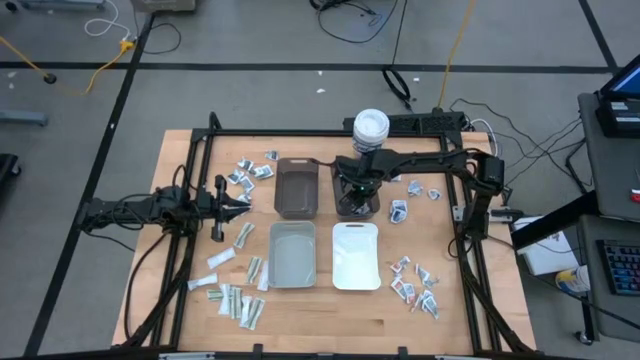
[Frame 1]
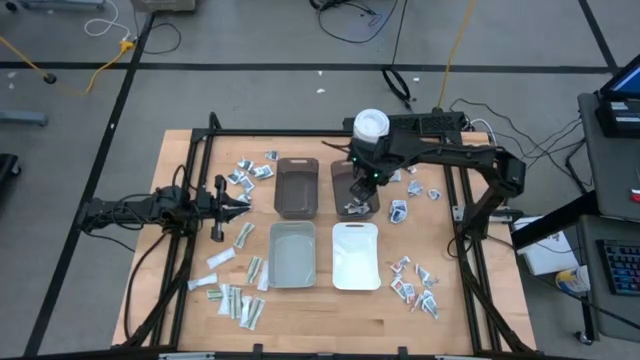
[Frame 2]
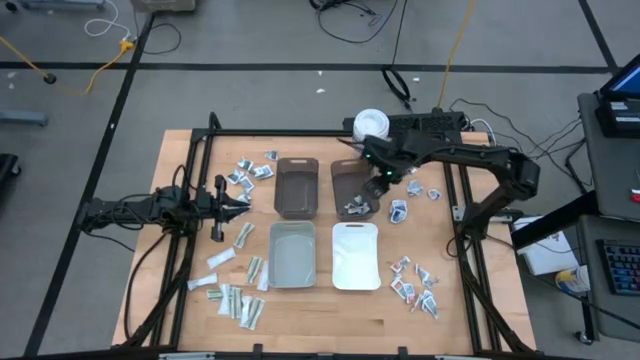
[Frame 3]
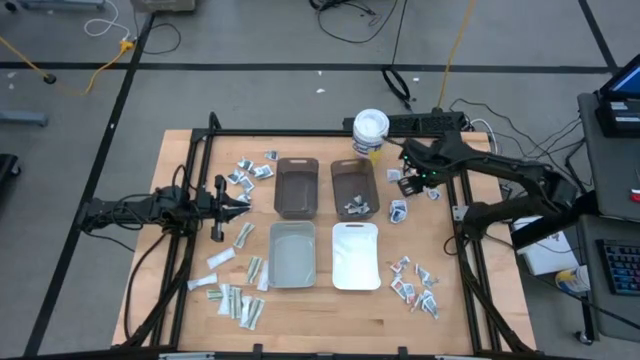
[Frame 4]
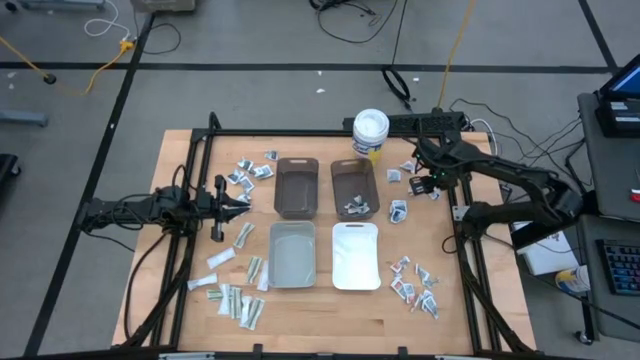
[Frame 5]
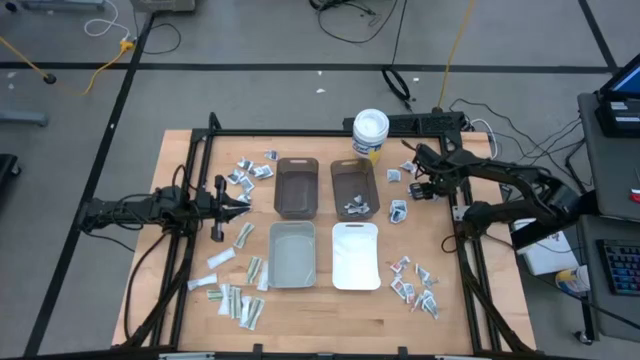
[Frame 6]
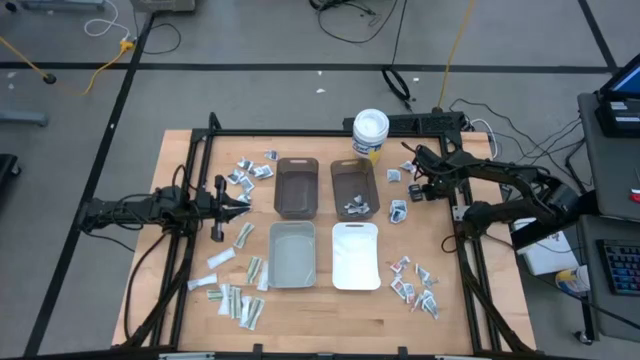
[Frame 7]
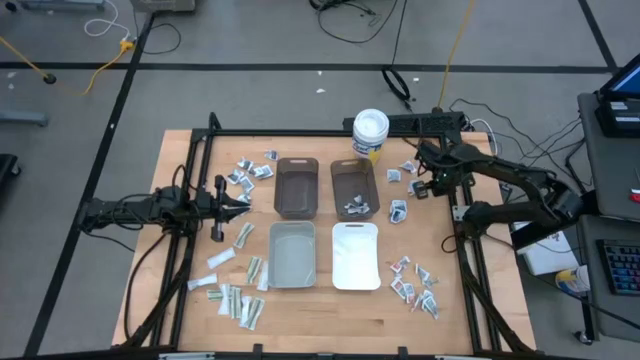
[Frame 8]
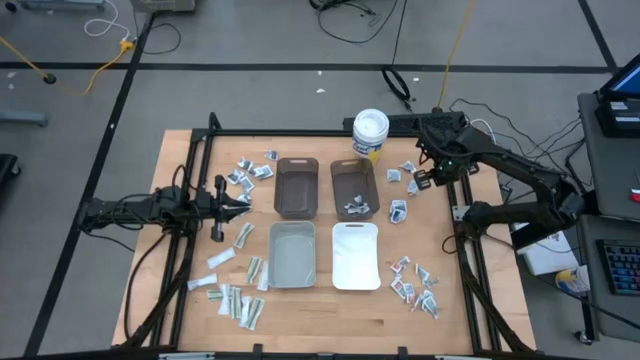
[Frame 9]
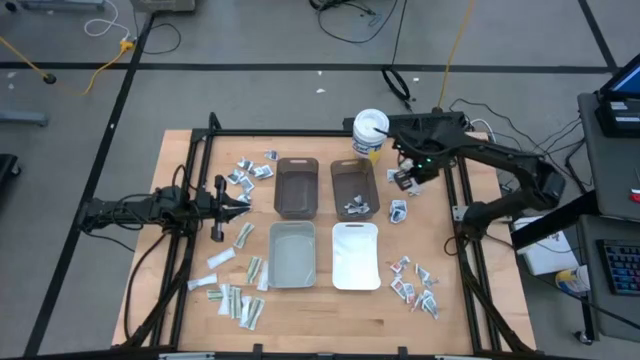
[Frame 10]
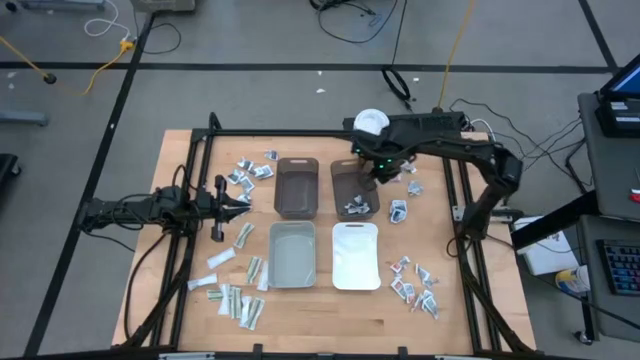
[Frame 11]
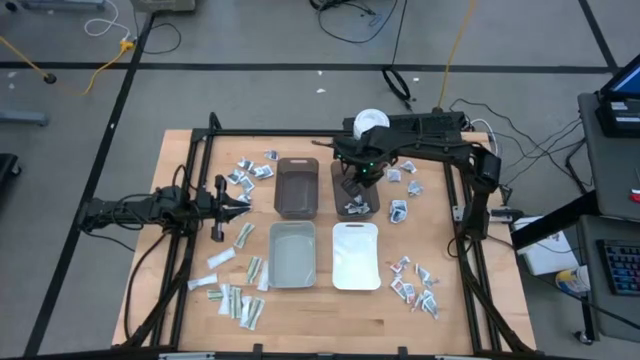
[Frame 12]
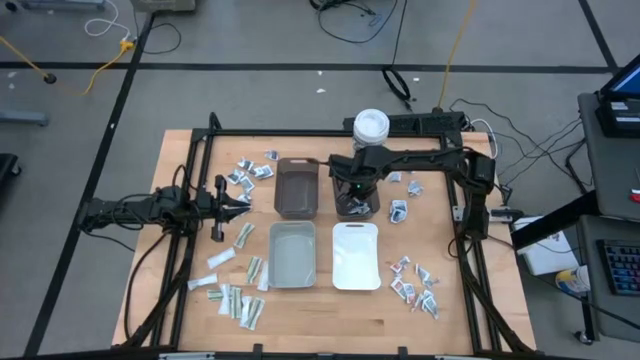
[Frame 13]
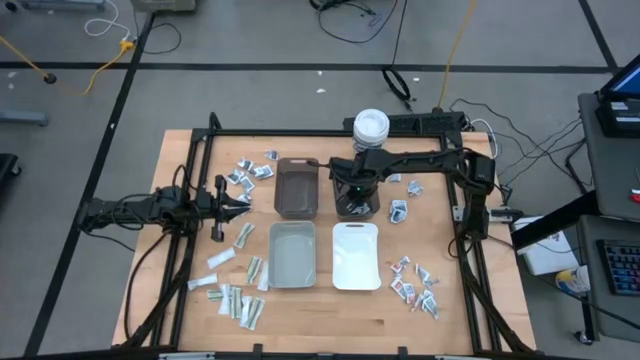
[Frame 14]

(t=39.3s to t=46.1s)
Task: Pick & Place First Aid Supplies
Put the blue pad into the right black bin

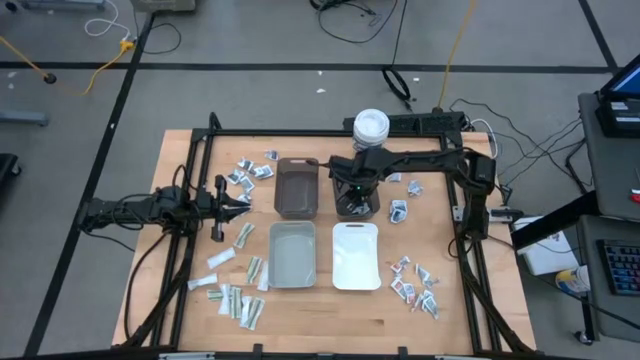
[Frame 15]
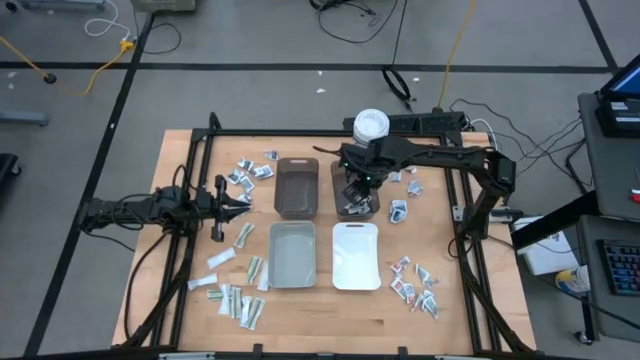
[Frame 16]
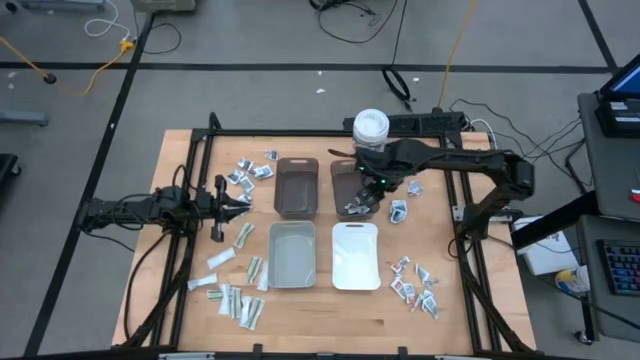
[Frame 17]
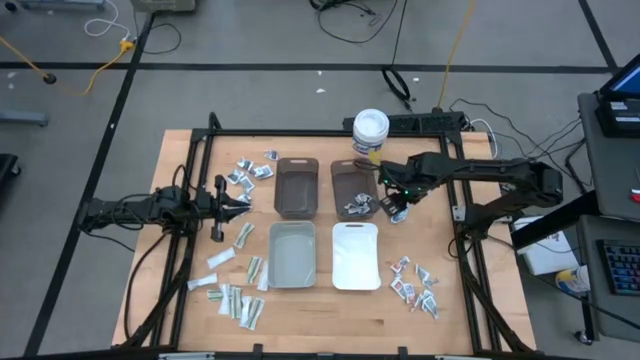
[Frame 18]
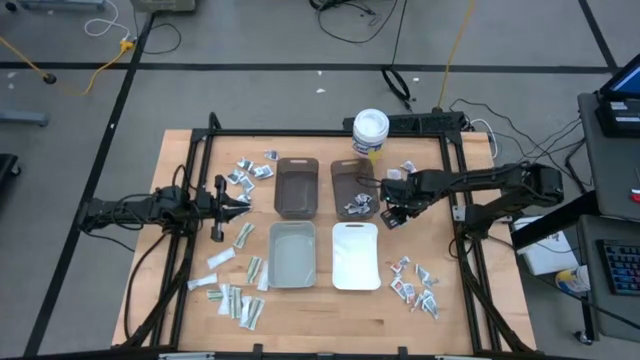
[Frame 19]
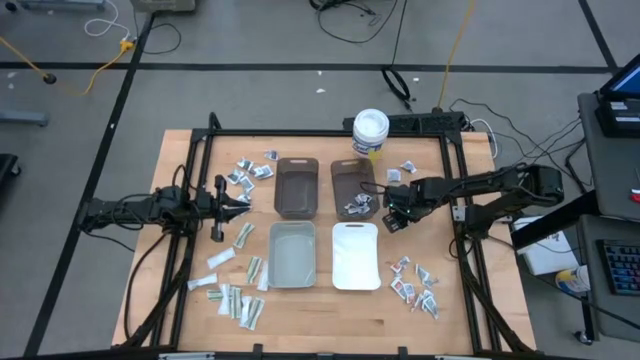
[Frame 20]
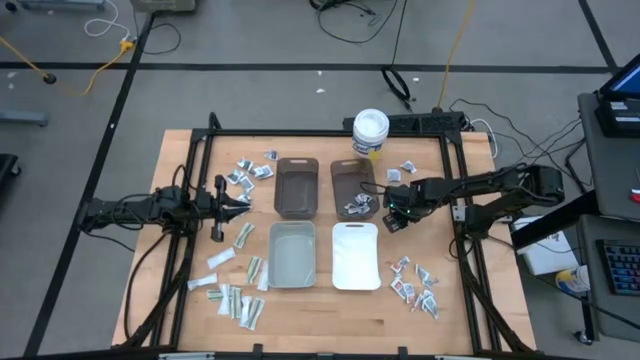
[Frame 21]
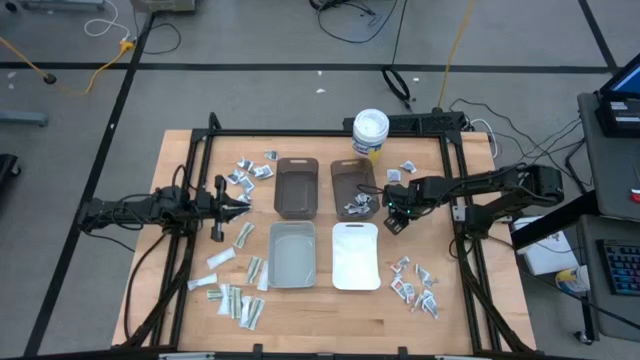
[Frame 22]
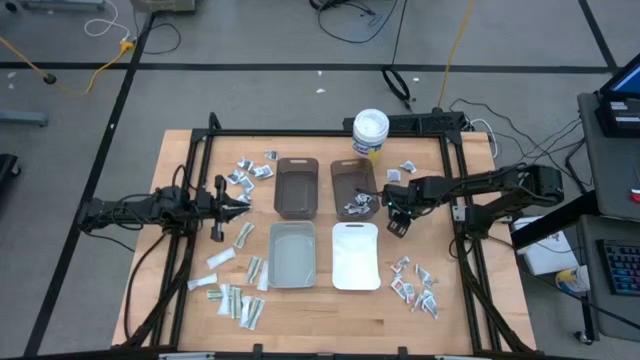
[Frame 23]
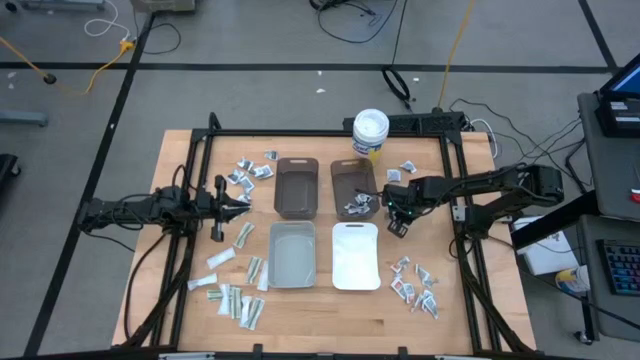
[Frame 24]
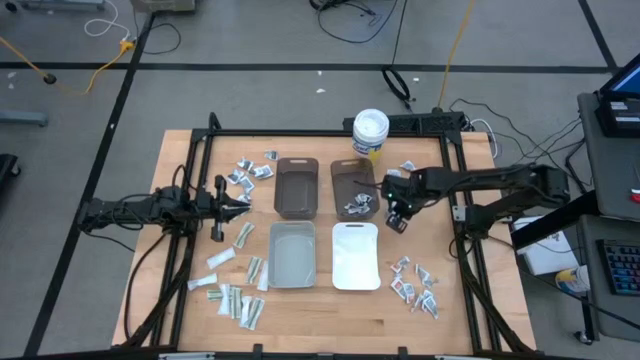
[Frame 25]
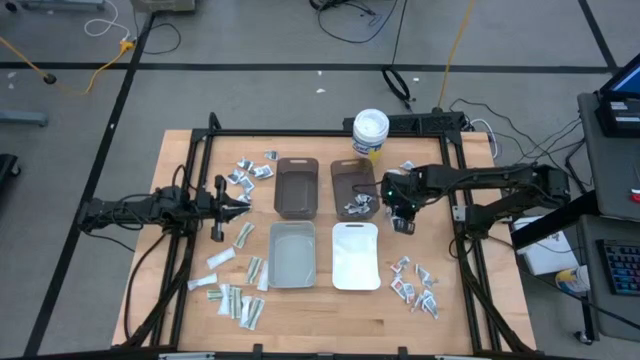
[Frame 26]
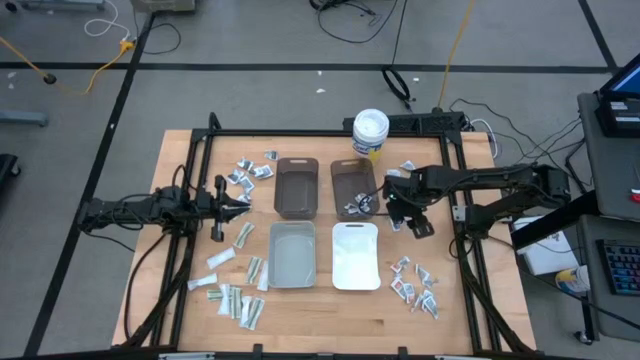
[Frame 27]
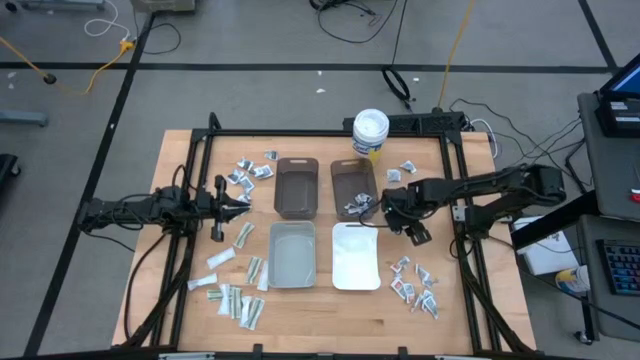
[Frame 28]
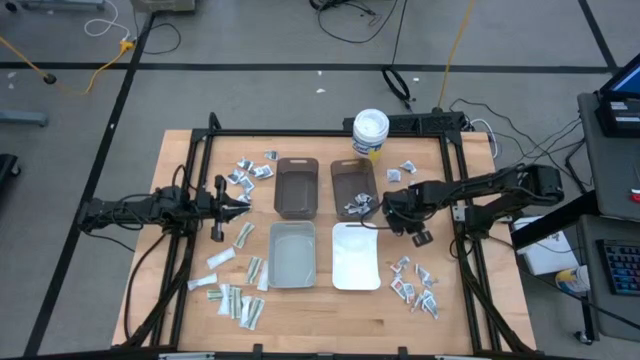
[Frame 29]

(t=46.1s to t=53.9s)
Put the blue pad into the right black bin

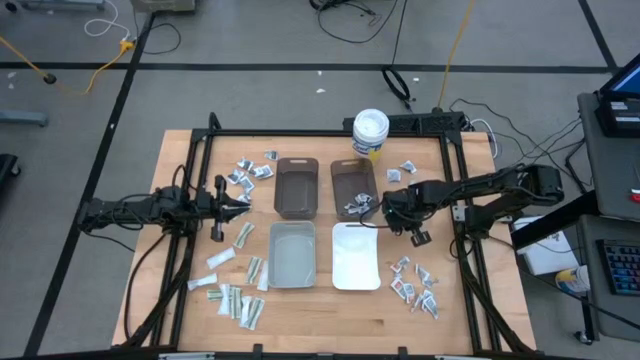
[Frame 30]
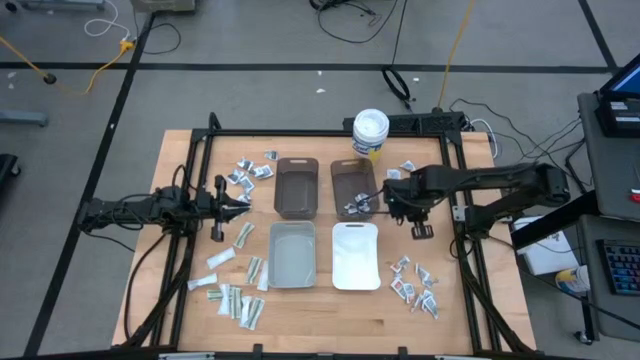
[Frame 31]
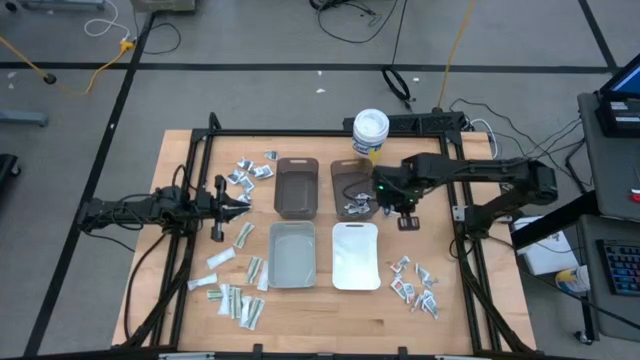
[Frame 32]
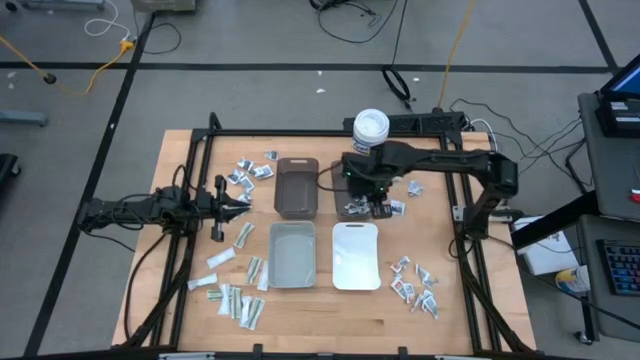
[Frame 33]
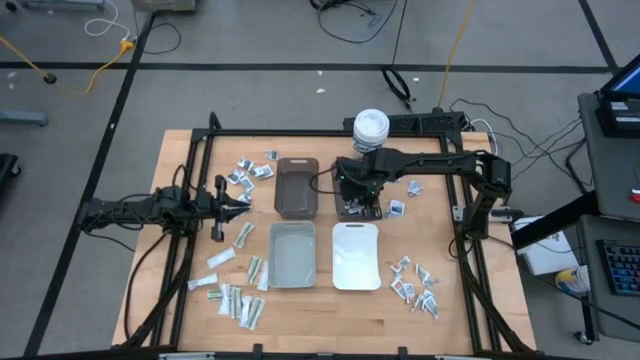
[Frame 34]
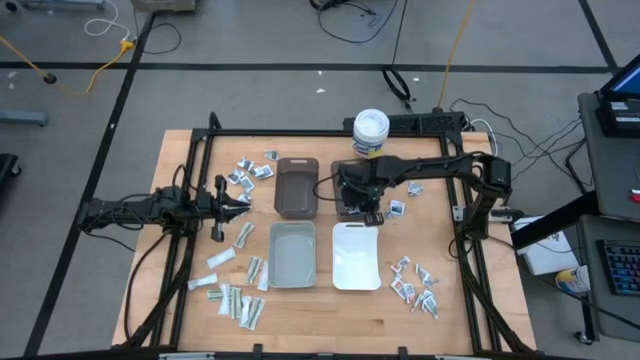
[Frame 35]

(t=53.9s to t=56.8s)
Put the blue pad into the right black bin

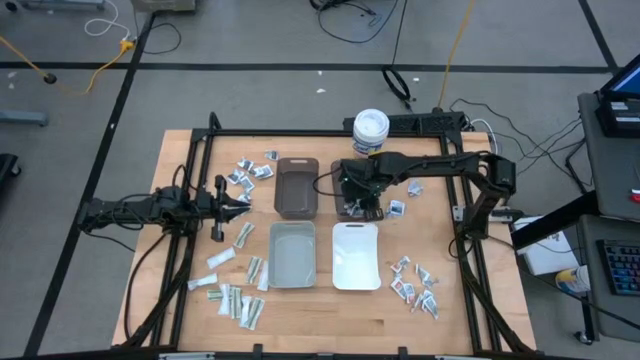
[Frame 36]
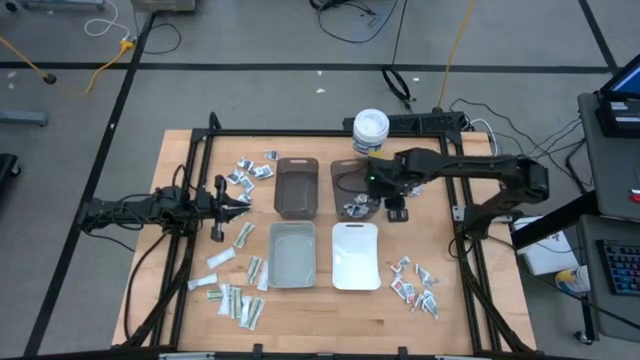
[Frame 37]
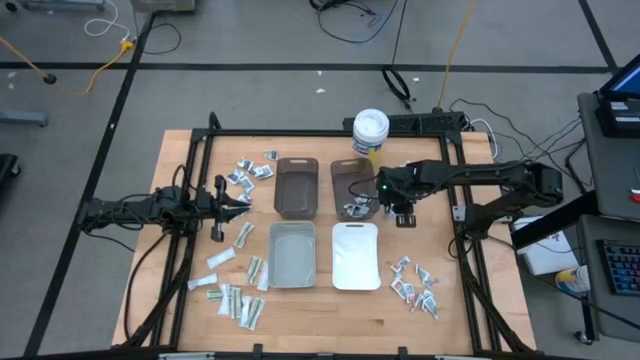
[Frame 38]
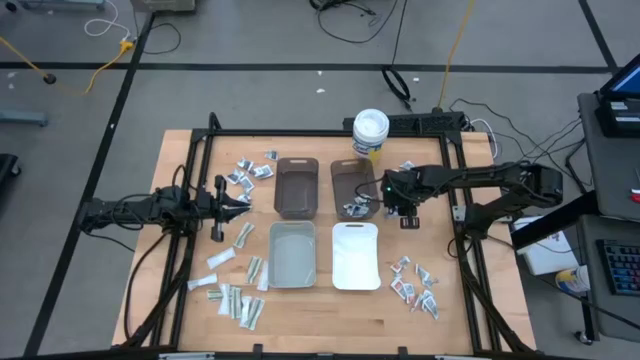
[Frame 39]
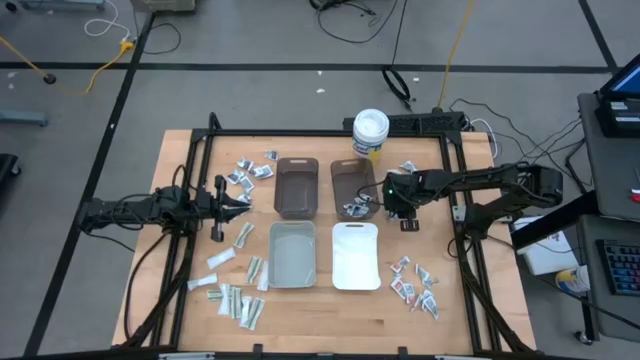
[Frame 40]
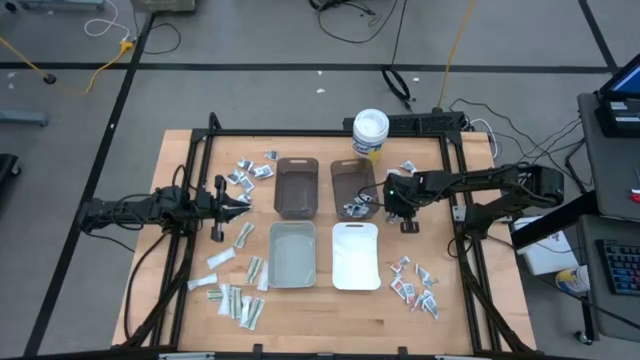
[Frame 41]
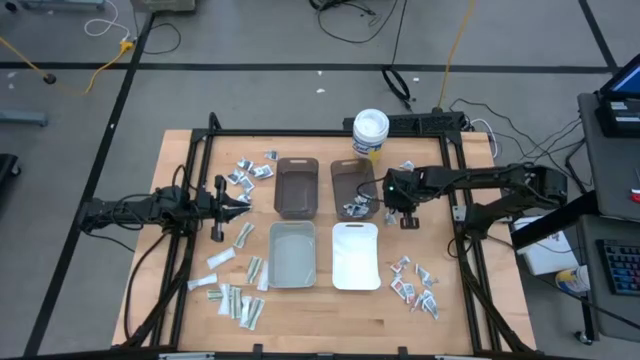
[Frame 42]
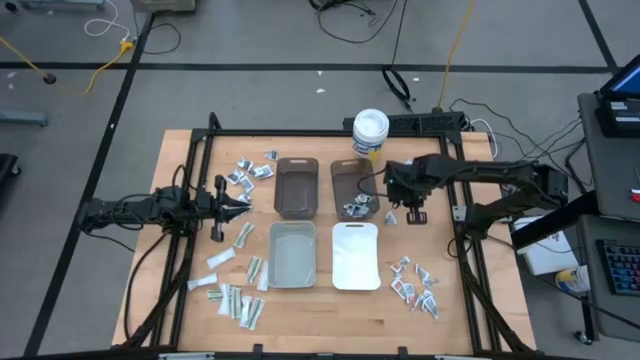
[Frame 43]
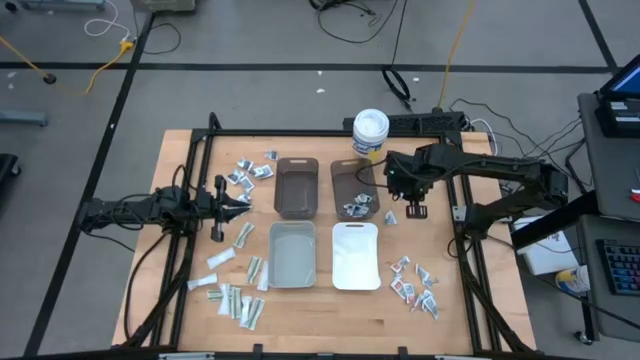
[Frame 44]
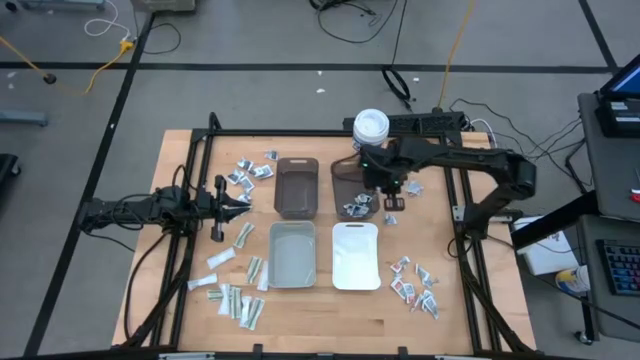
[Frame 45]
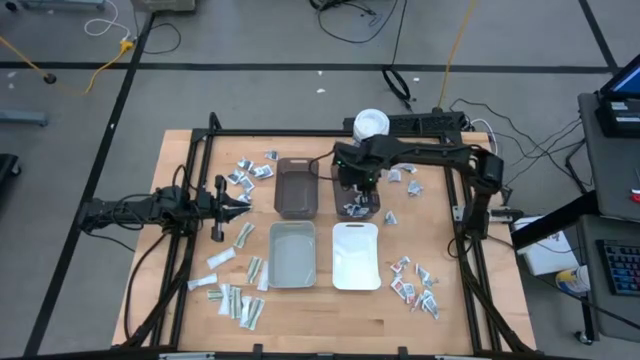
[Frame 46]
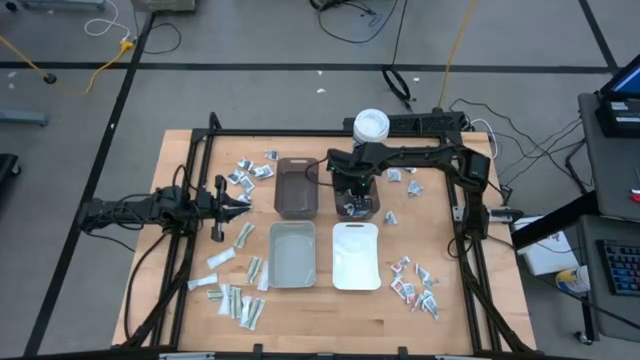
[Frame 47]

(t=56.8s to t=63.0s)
Put the blue pad into the right black bin
